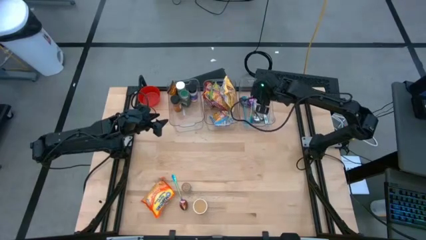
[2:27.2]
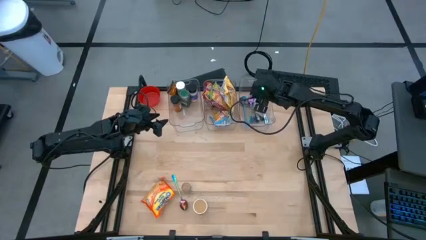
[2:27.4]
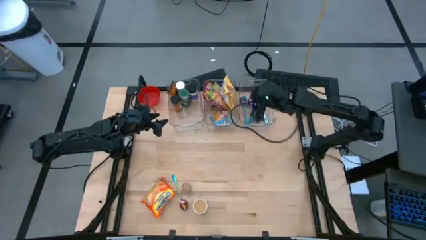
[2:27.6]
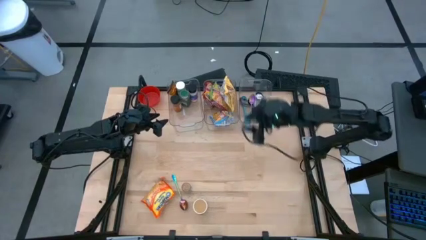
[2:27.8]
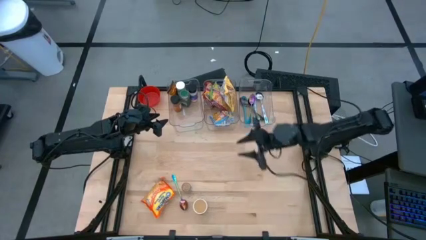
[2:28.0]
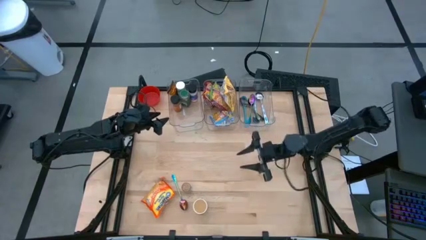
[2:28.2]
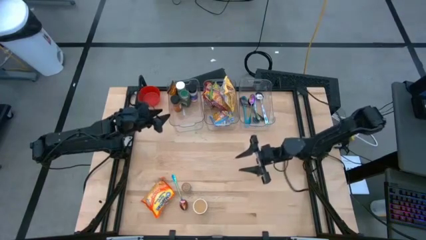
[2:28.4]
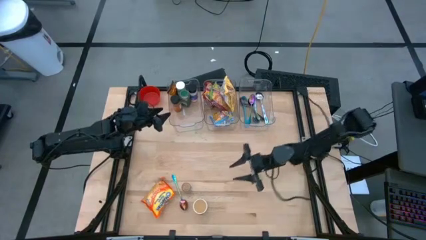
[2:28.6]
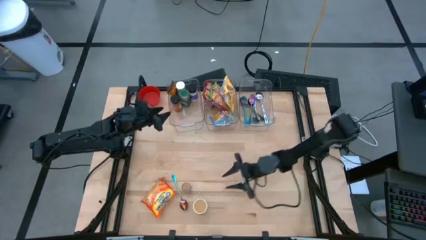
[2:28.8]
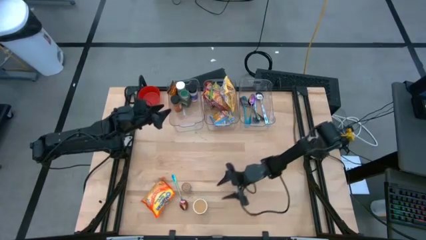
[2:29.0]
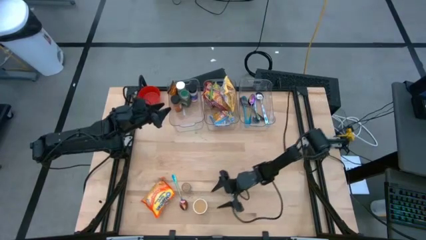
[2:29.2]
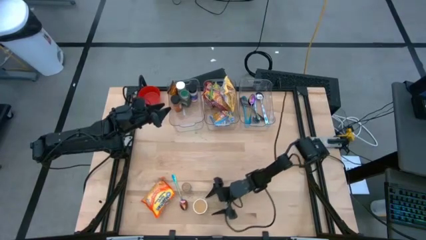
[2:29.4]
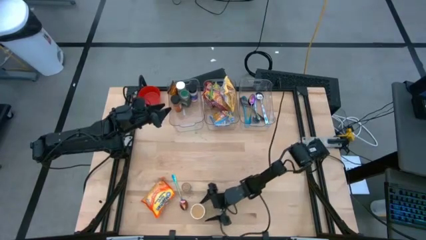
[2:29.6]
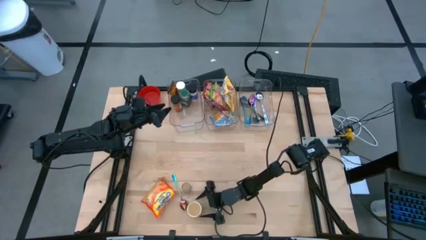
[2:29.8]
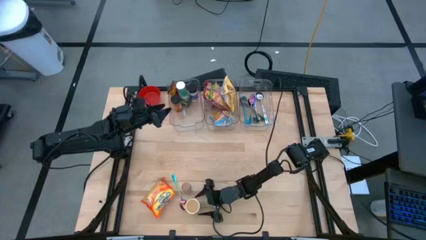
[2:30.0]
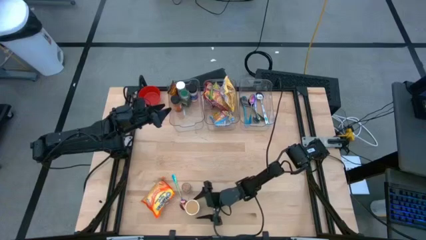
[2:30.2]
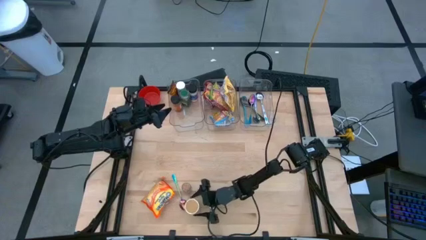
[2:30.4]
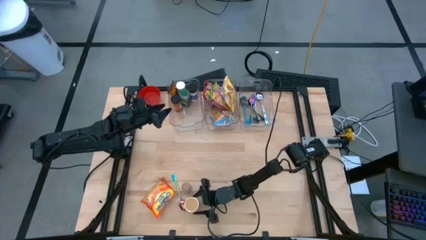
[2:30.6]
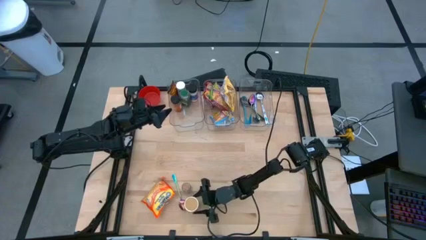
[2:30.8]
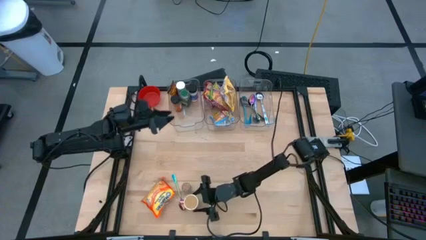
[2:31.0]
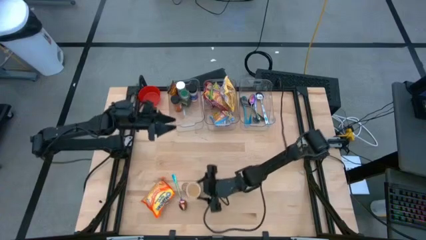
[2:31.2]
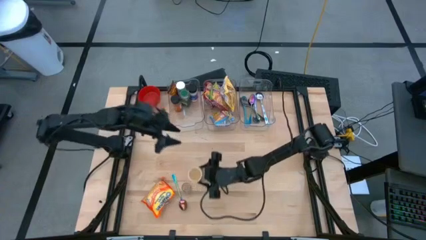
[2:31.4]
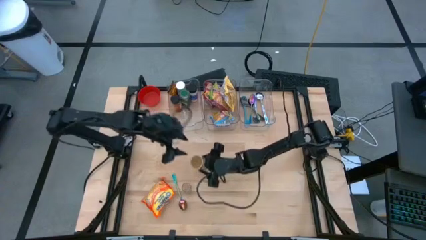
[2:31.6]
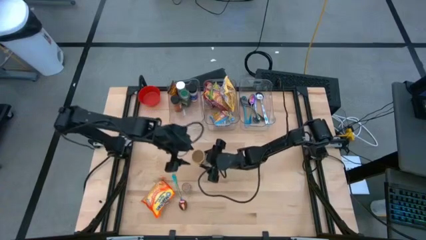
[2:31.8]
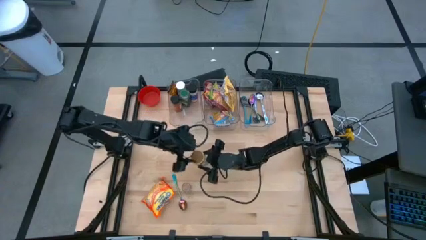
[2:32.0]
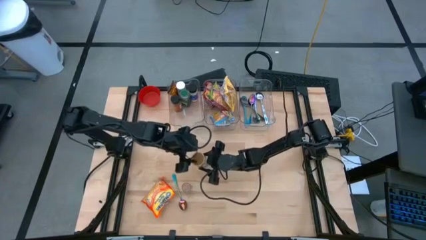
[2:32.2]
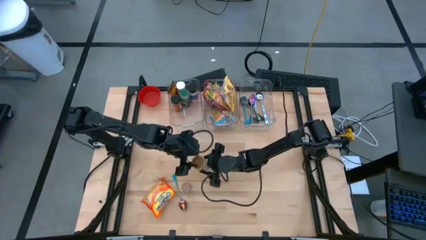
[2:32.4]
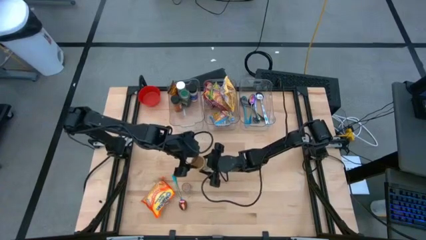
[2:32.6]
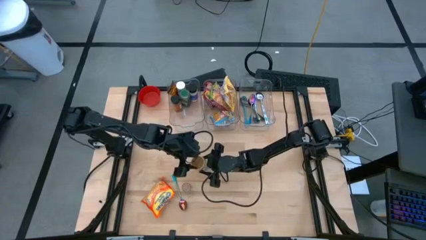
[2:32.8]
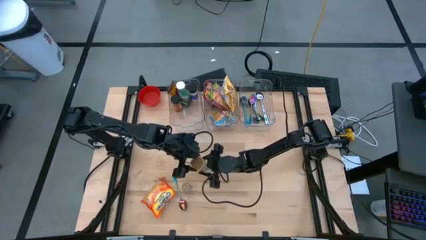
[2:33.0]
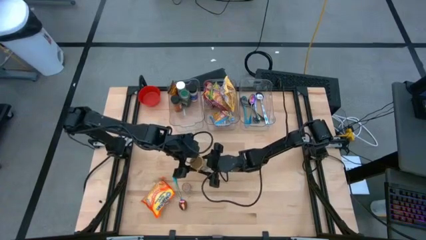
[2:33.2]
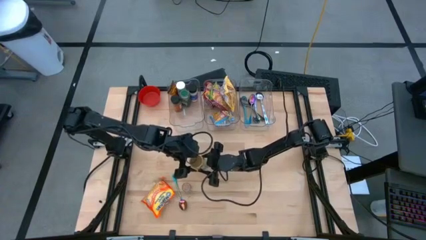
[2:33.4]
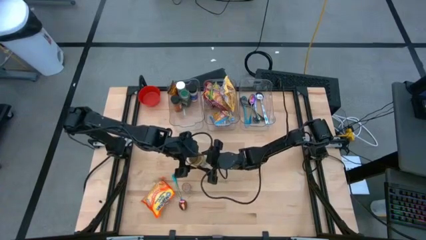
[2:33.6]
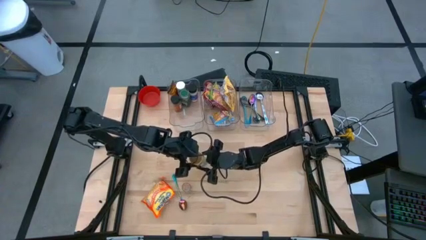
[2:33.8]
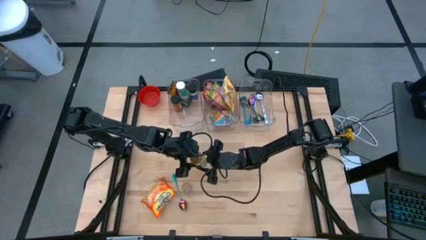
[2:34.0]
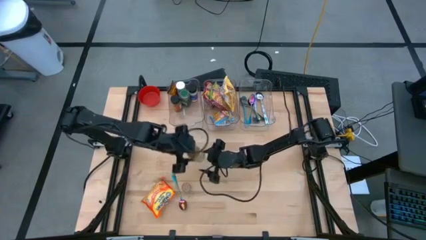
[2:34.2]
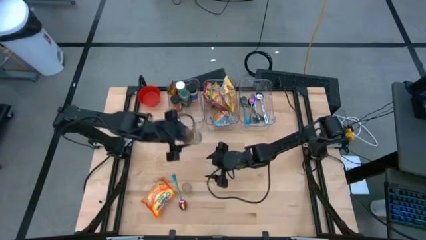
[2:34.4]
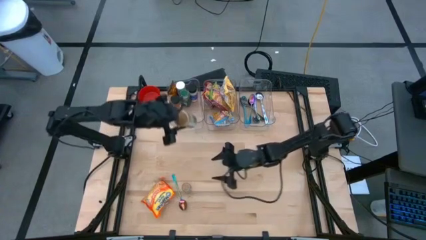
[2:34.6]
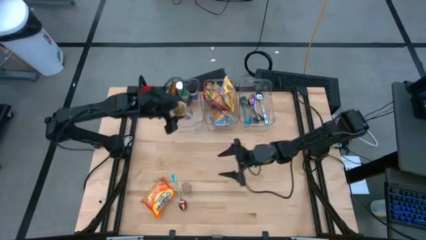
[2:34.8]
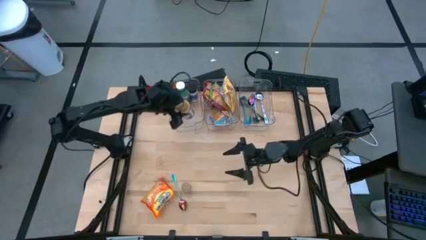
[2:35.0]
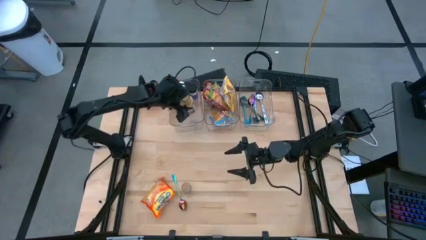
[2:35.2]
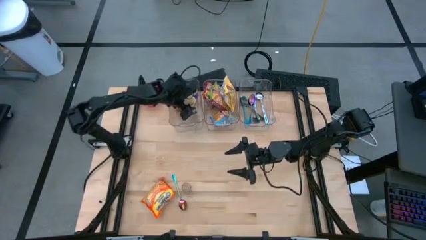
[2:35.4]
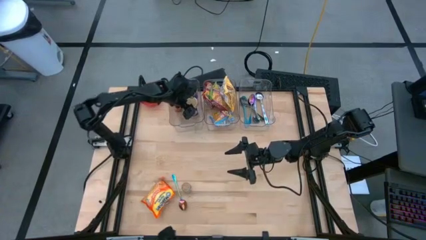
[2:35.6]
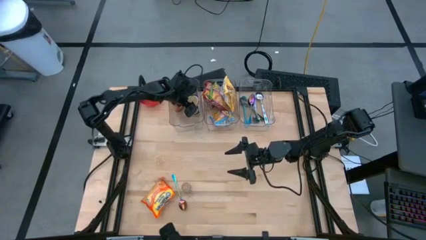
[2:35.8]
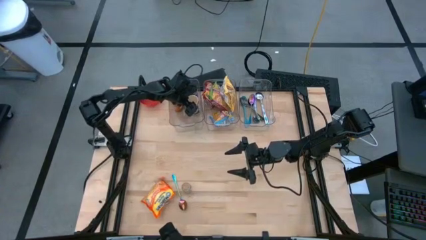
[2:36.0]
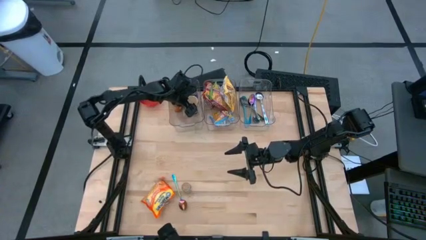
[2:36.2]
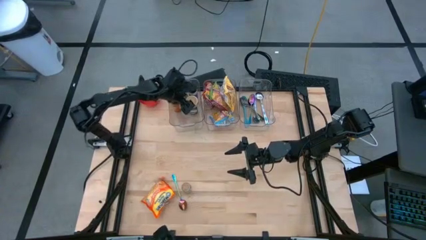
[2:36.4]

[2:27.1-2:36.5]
Task: Pick & Place Food Item
Put the golden seasoning bottle into the left transparent bin

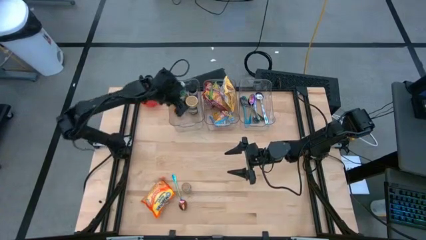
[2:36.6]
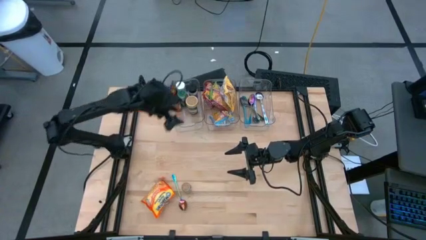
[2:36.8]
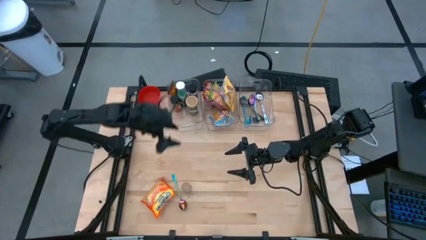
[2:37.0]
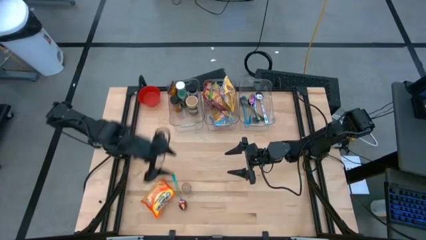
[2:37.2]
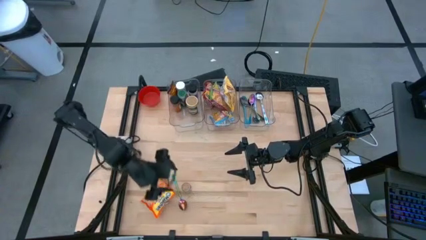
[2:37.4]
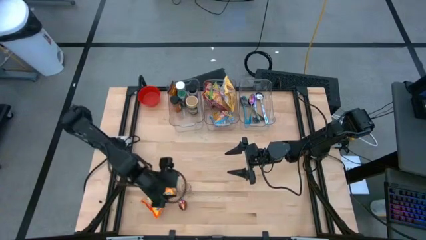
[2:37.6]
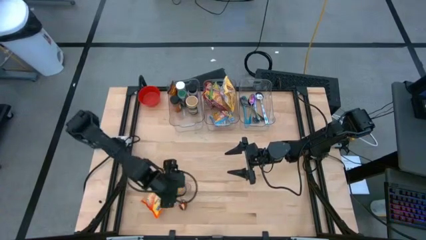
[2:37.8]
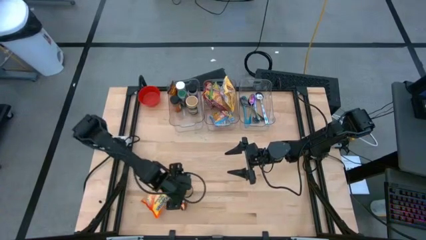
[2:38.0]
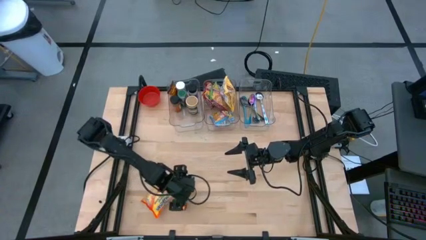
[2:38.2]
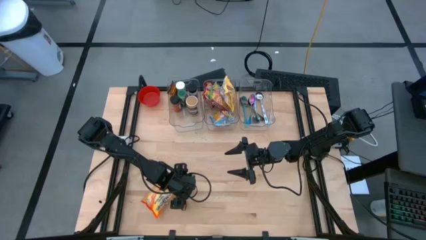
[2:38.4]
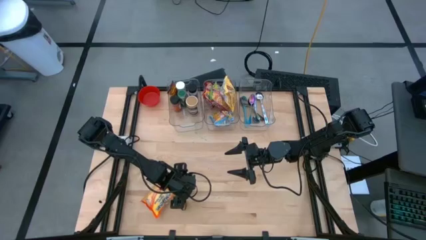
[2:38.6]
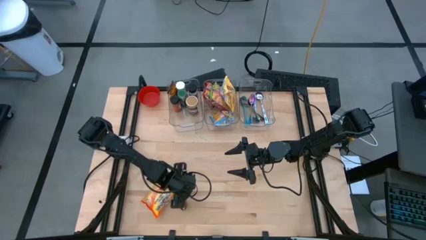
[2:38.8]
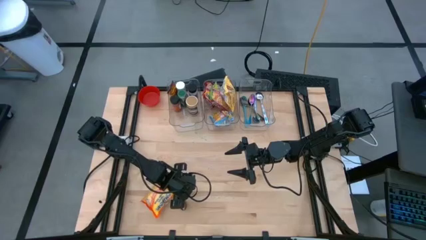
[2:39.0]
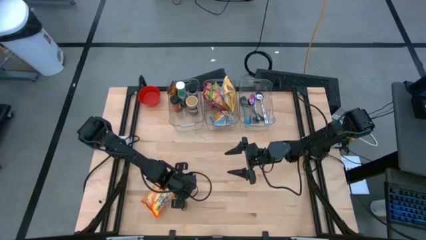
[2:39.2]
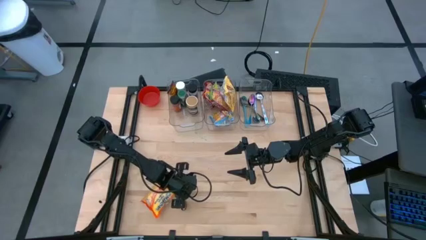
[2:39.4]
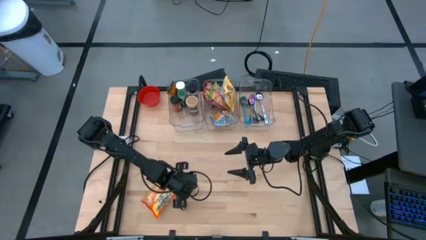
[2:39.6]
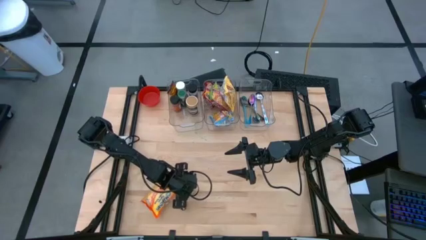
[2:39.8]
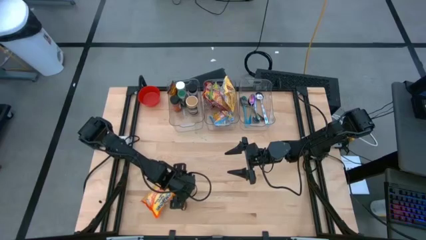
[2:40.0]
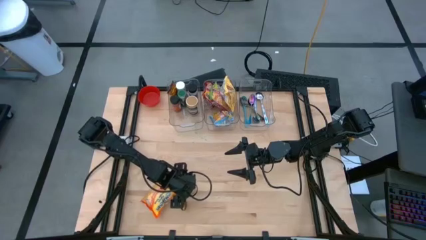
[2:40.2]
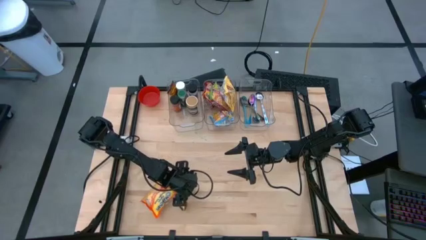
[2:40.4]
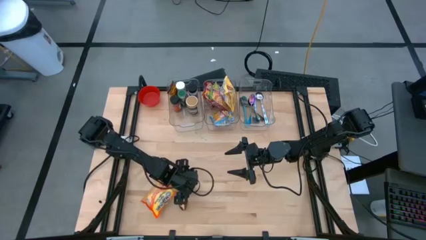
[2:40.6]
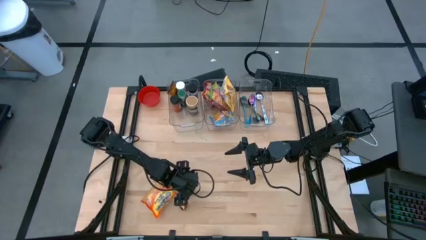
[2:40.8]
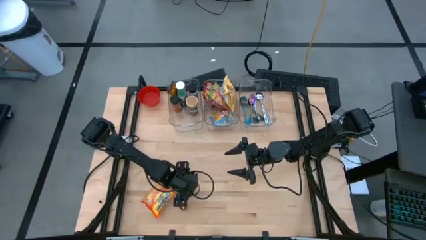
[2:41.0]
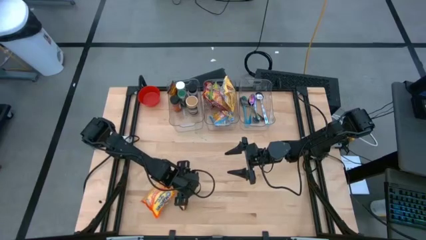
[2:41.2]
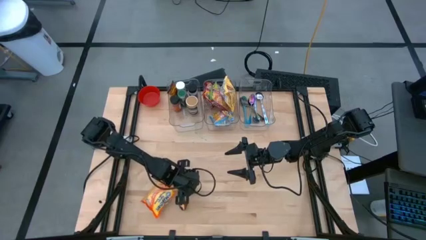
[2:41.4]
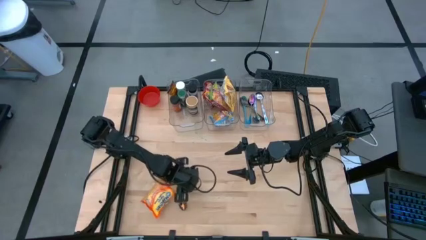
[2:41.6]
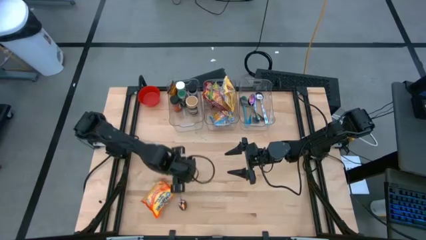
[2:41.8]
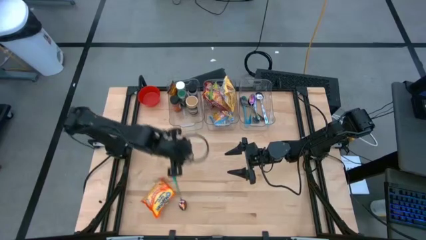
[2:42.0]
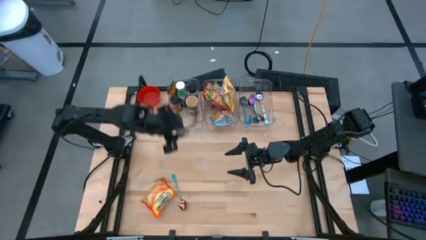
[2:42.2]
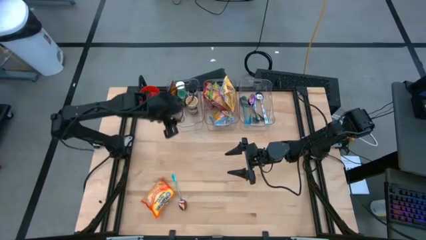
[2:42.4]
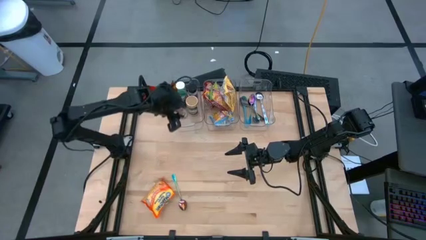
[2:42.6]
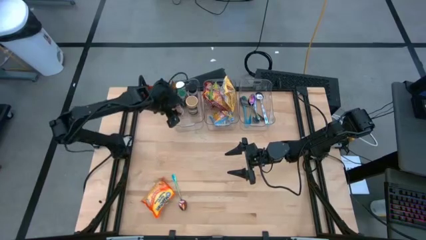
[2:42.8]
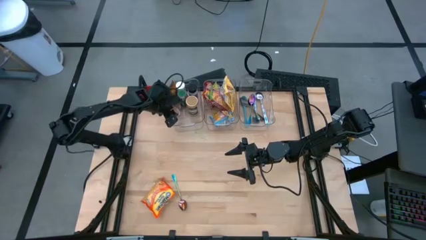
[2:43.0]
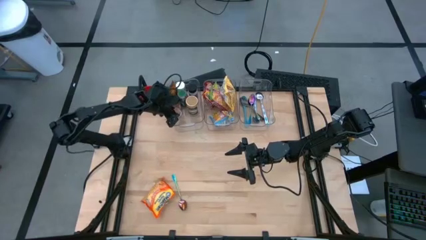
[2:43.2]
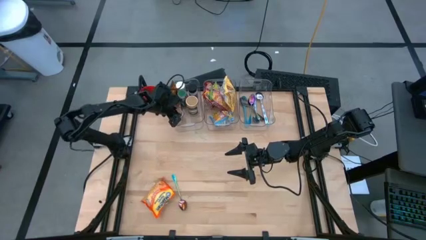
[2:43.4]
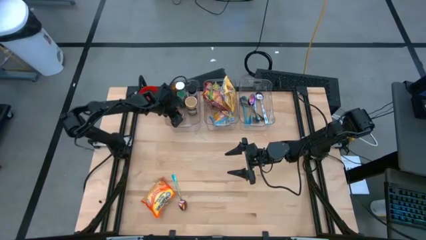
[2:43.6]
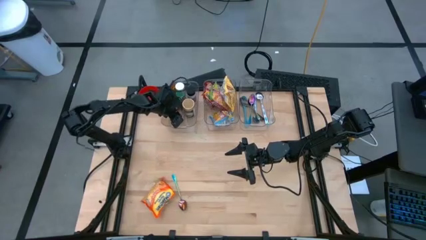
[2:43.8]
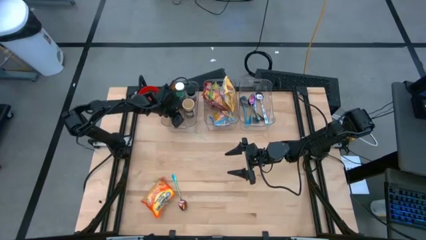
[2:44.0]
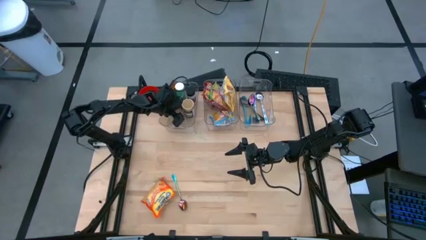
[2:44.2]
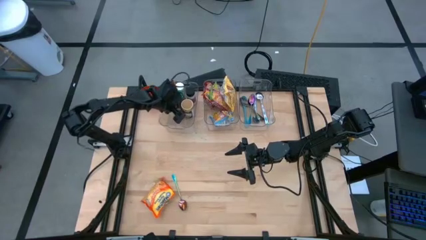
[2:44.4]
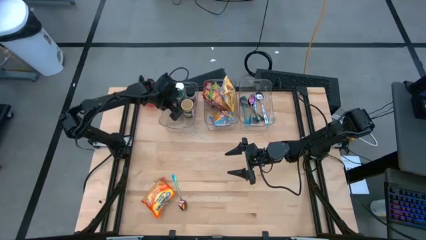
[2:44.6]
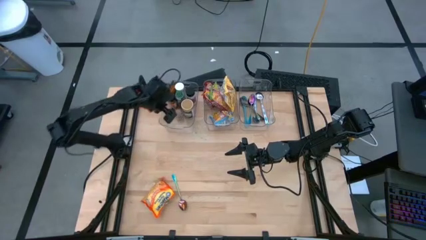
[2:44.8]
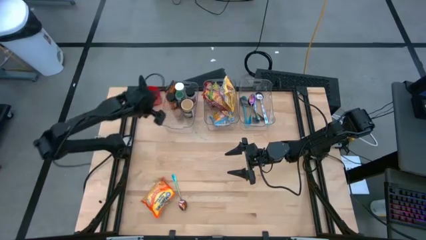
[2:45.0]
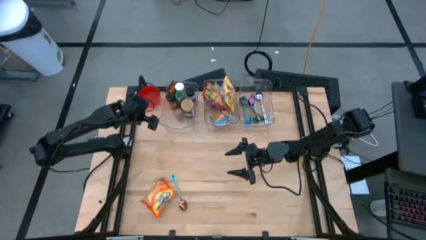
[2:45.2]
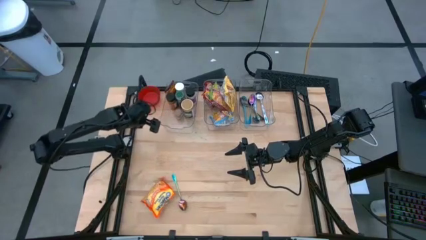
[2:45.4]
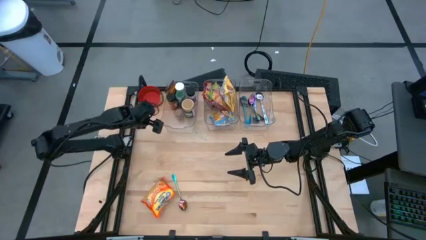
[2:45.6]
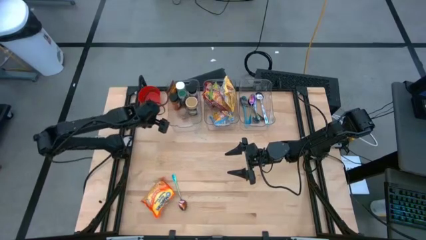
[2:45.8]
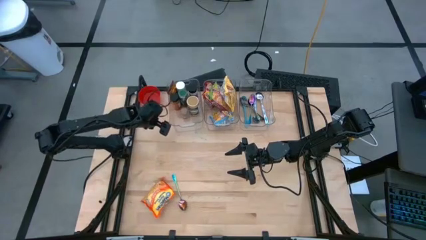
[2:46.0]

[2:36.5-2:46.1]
Put the brown seasoning bottle into the left transparent bin
